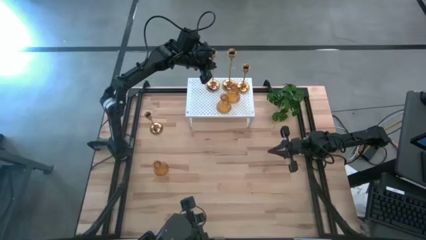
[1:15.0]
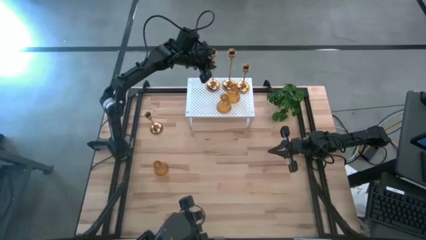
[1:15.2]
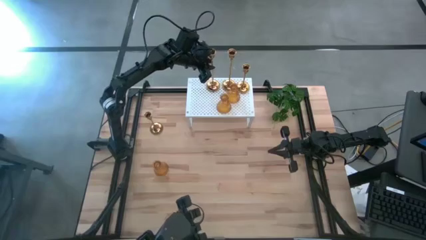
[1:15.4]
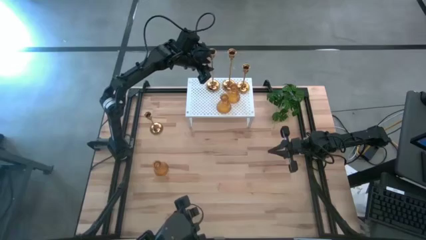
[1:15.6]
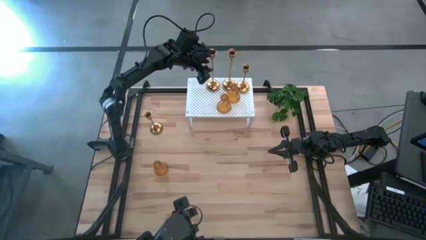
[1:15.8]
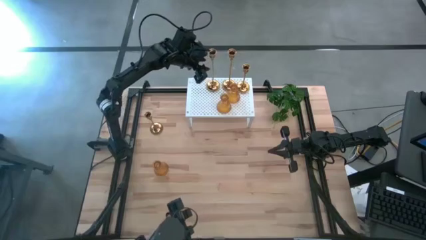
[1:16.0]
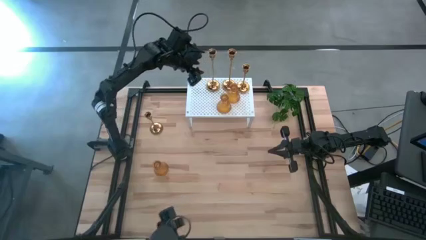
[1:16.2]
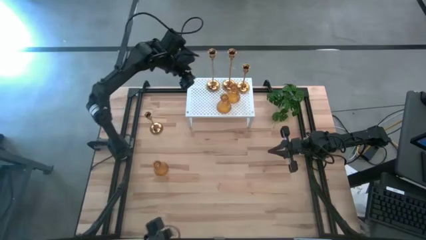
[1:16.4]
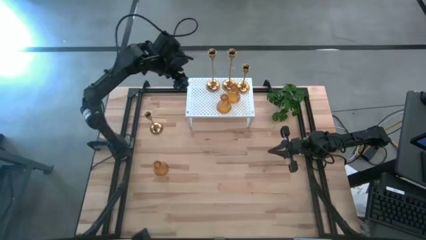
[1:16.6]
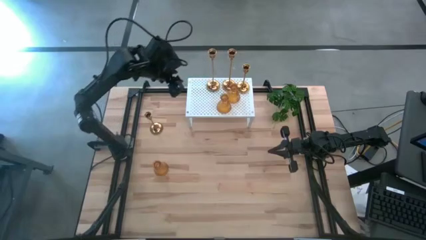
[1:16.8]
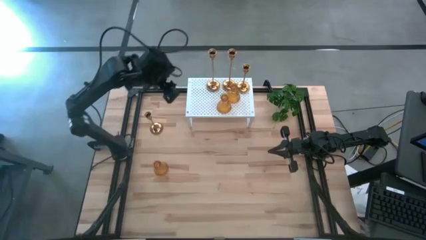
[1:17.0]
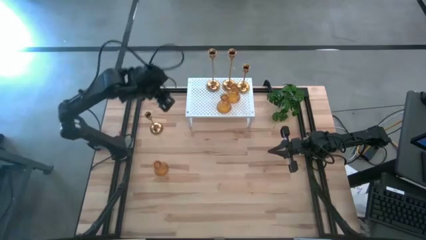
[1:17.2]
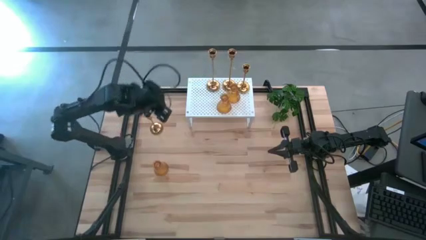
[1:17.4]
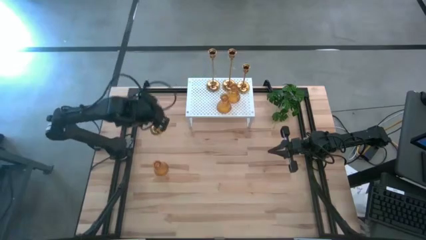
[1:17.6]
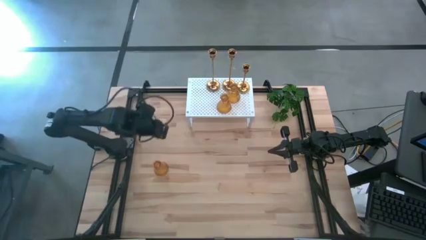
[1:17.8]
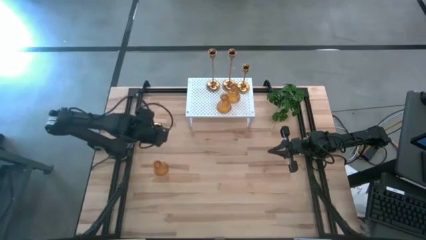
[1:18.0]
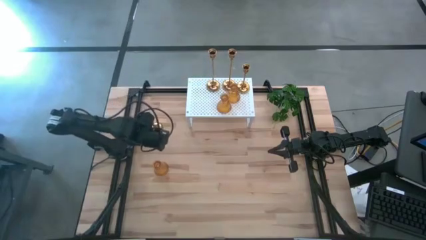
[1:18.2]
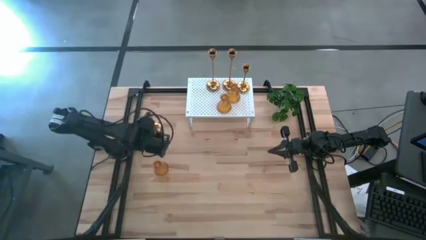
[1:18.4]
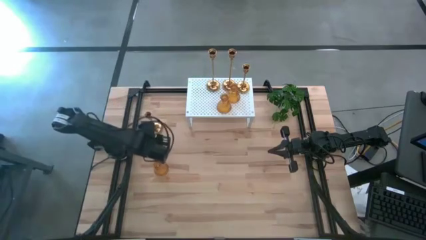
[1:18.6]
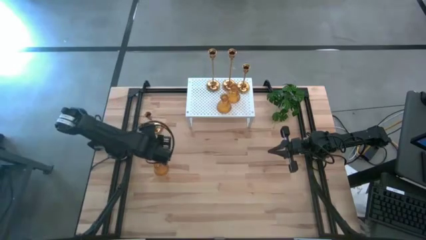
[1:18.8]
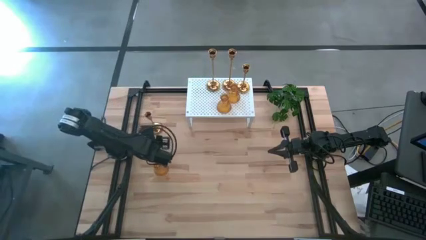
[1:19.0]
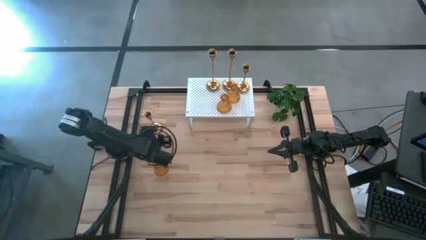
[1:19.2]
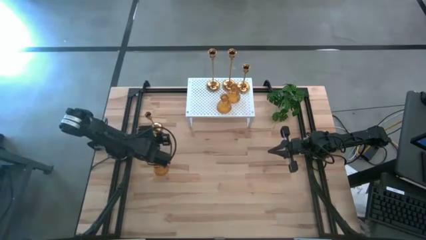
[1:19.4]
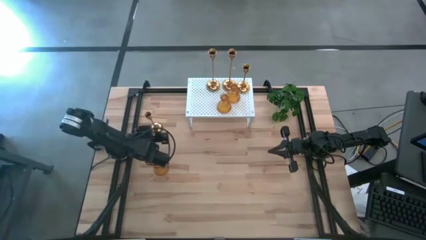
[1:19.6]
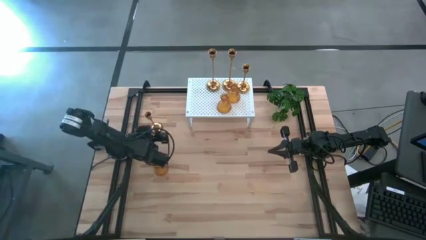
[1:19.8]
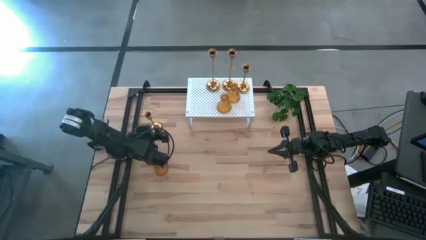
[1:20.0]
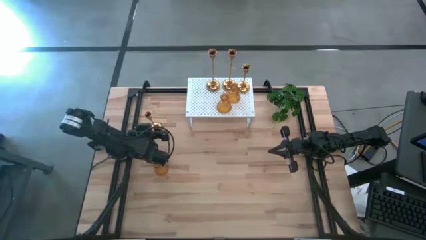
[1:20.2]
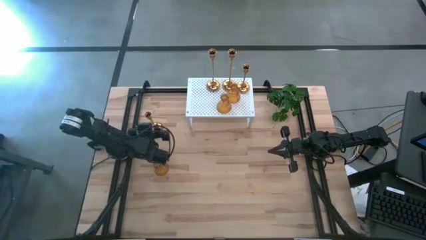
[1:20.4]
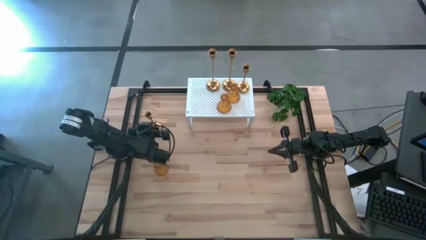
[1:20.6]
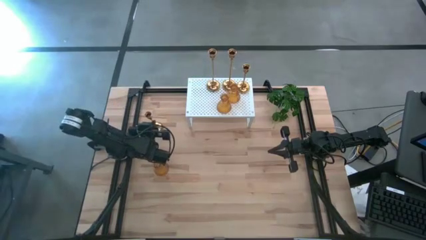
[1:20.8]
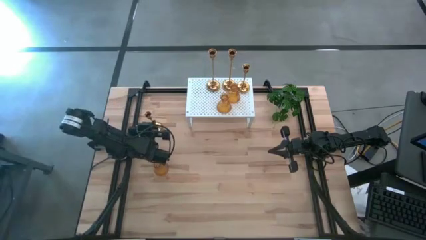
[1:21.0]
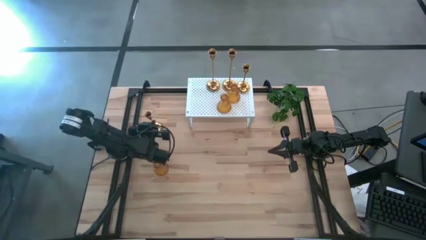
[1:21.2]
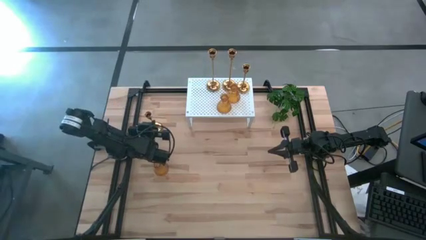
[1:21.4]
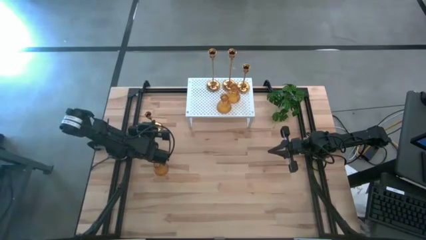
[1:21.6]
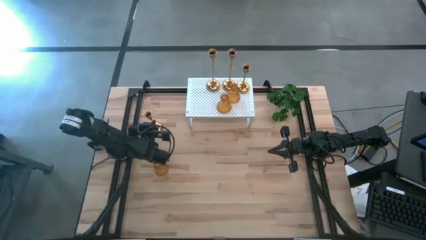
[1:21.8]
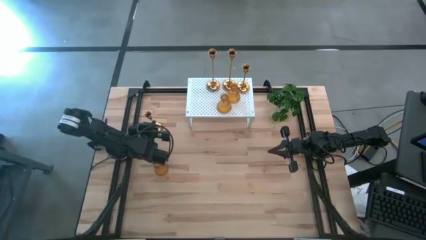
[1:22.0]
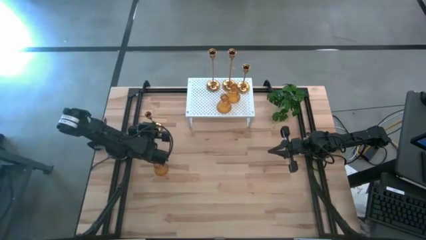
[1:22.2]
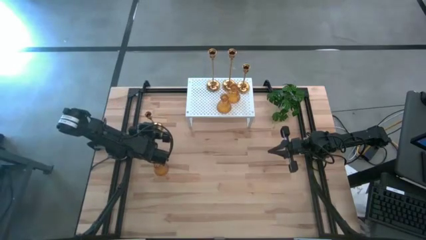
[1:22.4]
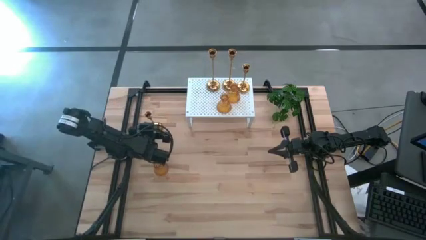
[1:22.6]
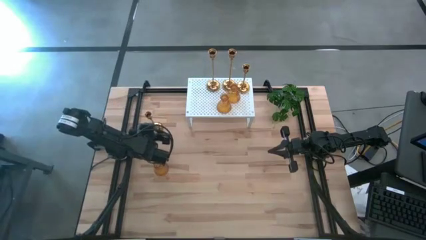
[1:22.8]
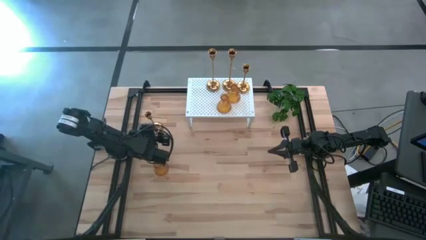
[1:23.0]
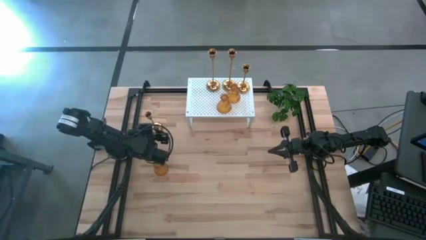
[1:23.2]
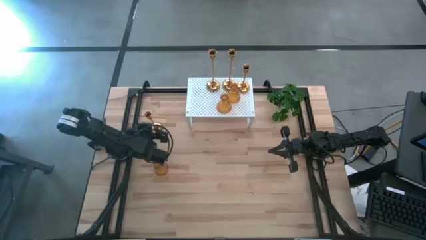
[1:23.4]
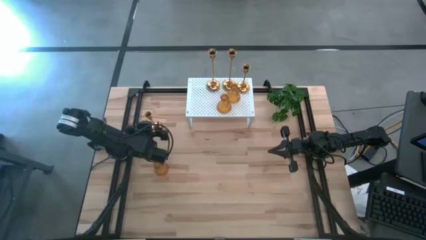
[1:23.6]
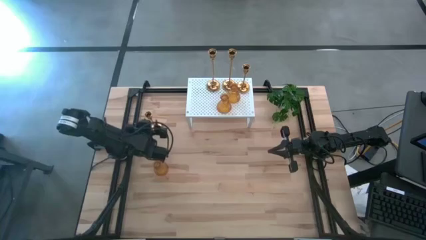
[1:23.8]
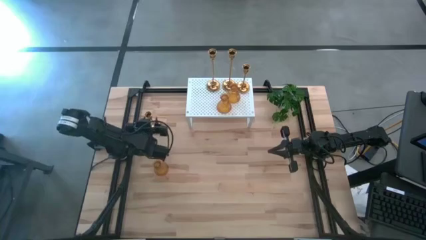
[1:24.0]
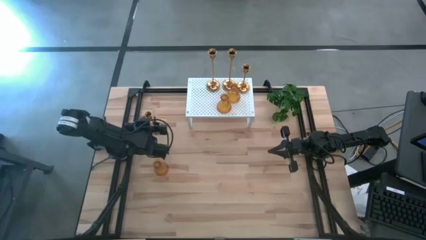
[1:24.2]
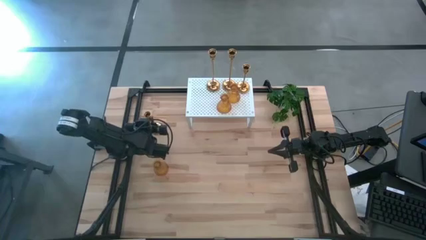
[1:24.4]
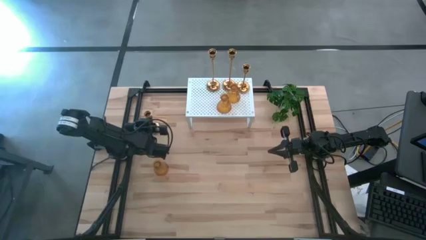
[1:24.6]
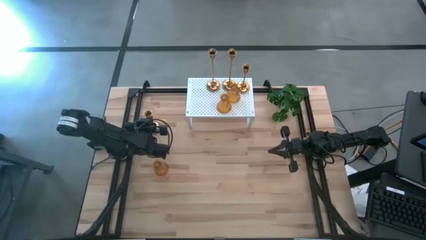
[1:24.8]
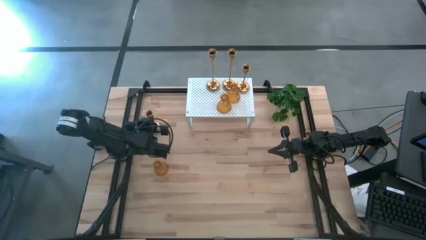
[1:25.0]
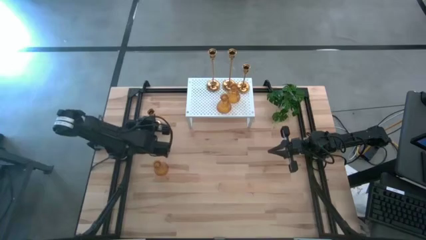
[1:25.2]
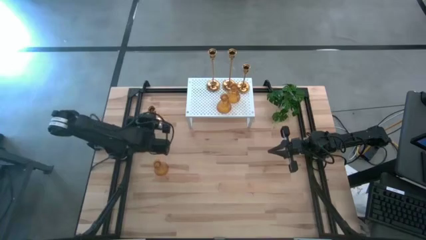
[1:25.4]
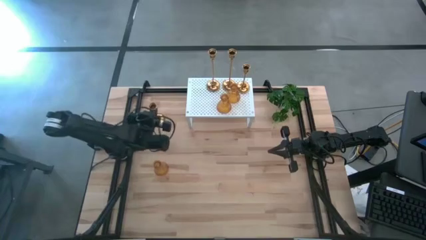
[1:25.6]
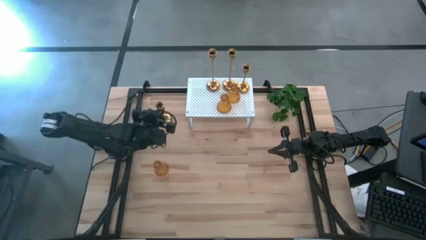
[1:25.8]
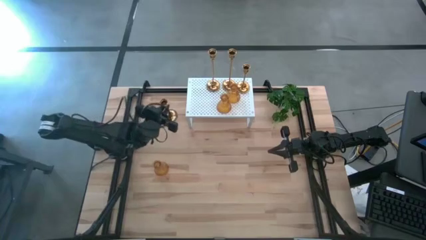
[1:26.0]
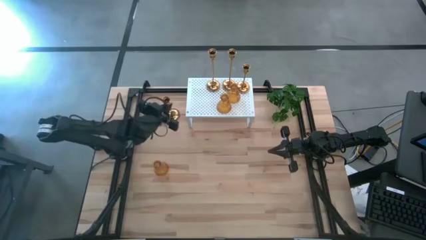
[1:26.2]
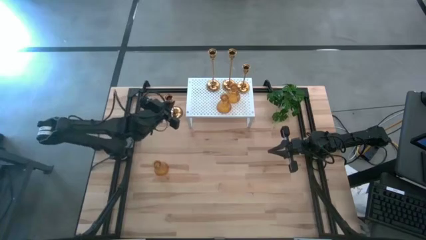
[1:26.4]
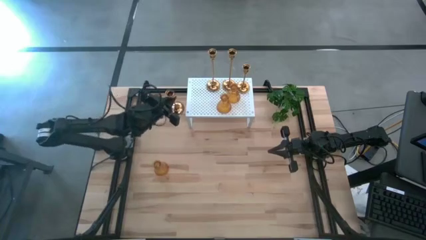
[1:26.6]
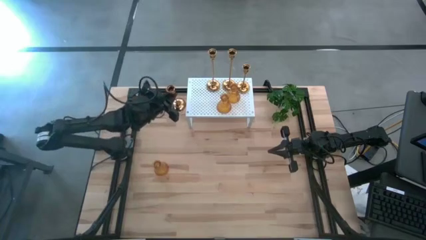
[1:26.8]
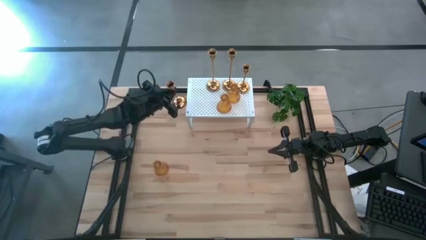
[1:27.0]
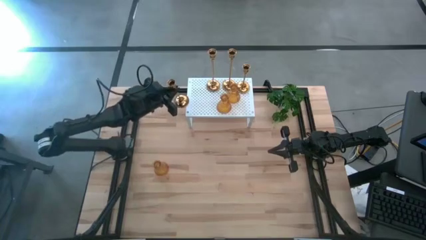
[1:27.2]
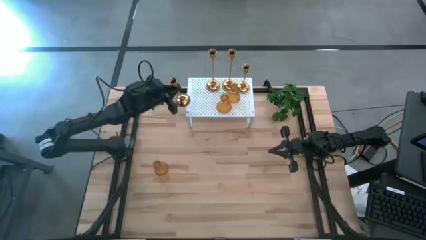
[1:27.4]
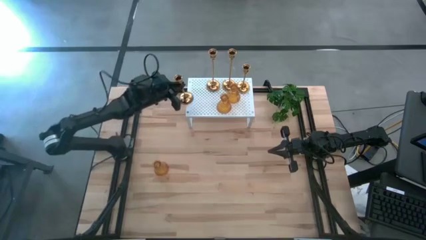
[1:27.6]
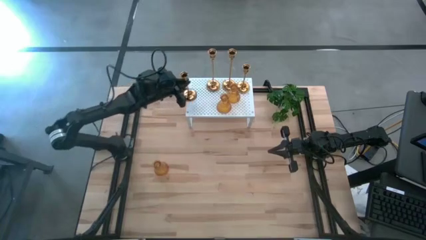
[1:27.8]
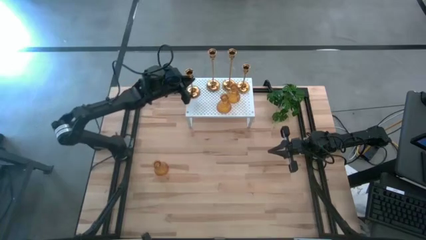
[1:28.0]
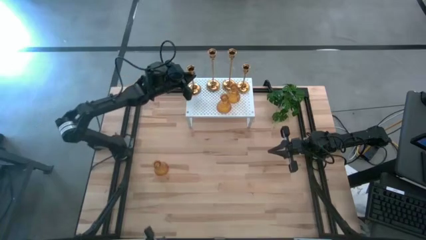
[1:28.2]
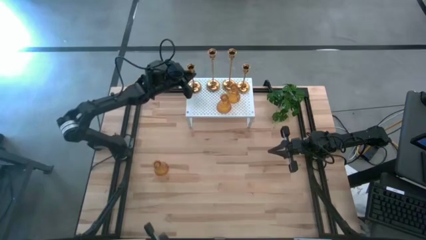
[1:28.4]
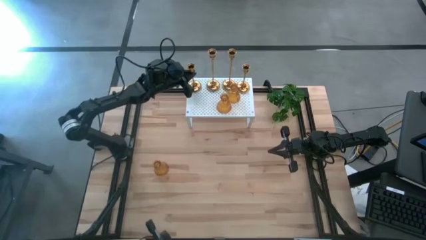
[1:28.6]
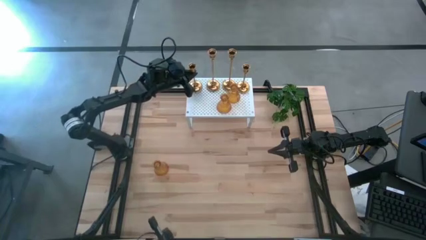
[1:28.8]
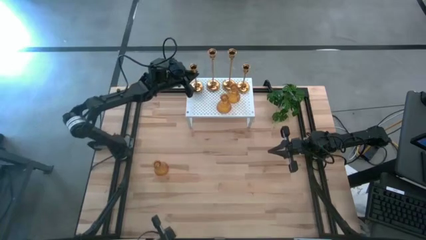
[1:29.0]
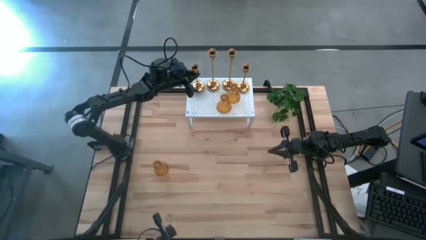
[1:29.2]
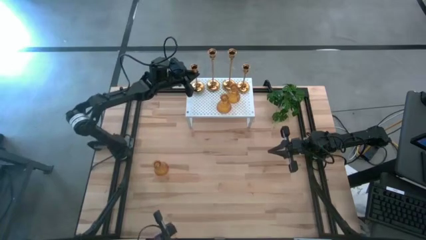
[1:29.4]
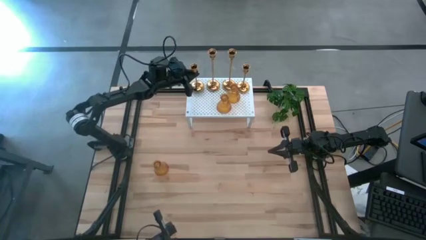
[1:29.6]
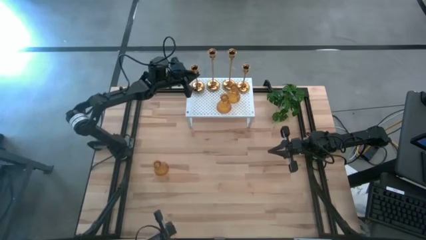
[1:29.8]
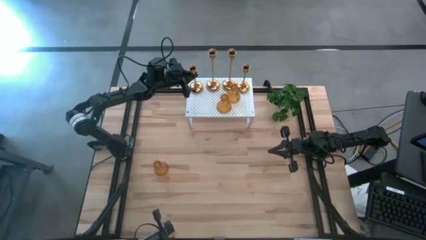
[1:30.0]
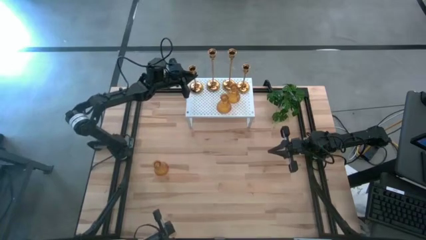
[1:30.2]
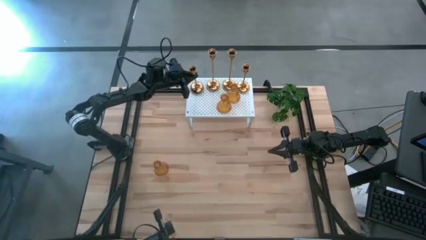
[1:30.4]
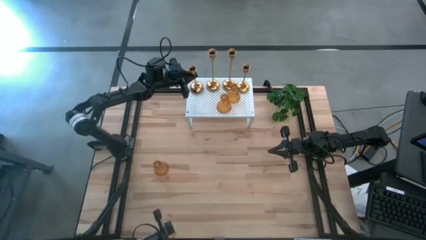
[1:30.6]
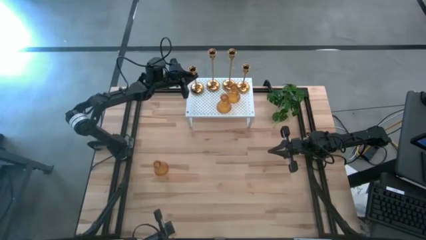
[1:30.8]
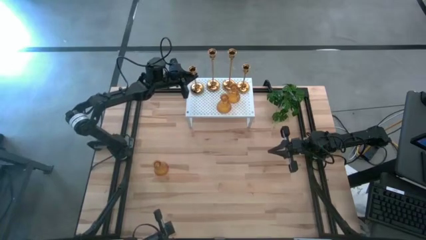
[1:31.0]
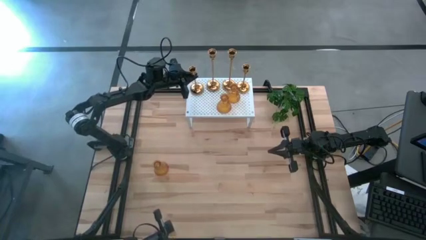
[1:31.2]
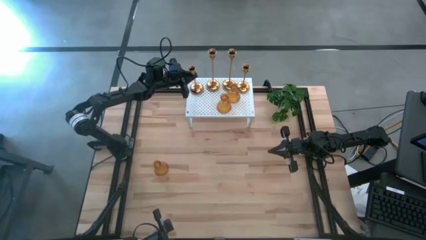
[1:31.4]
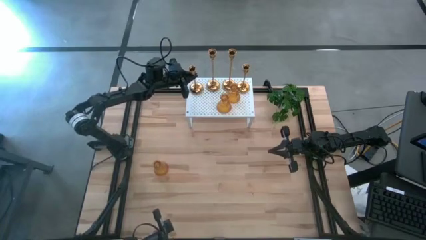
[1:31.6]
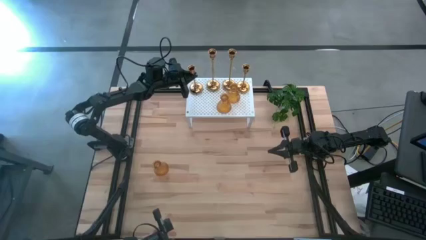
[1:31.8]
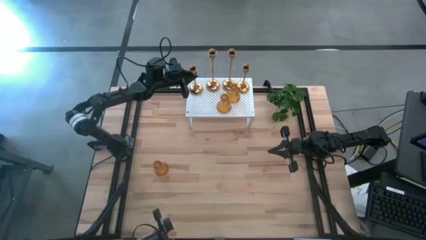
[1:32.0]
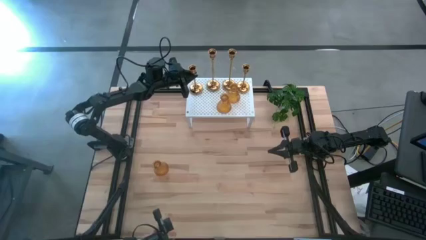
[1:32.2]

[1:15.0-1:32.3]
Task: Pick & Place candle stick holders
Put the small golden candle holder on the shelf
